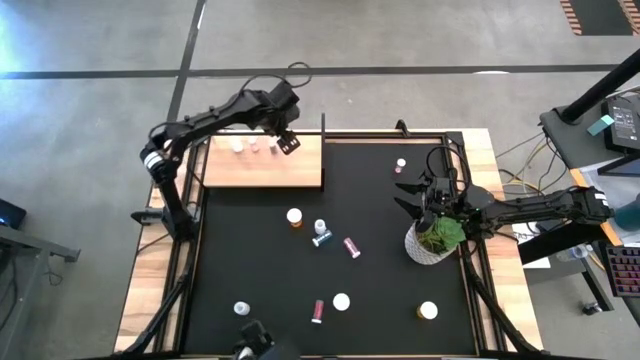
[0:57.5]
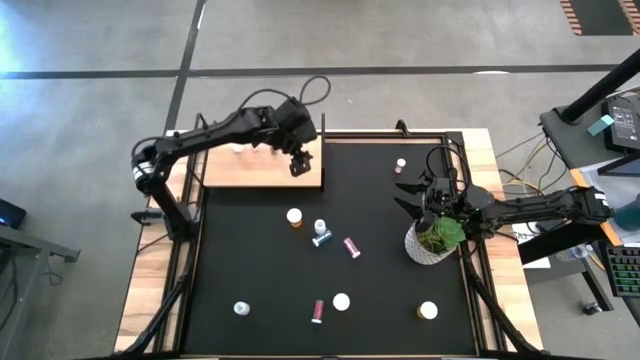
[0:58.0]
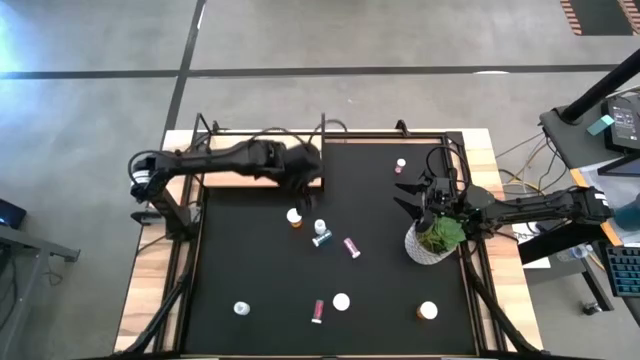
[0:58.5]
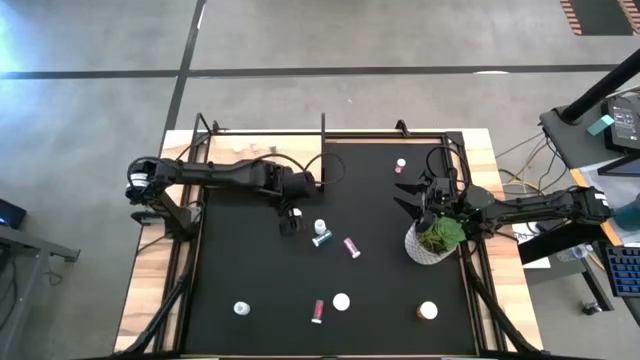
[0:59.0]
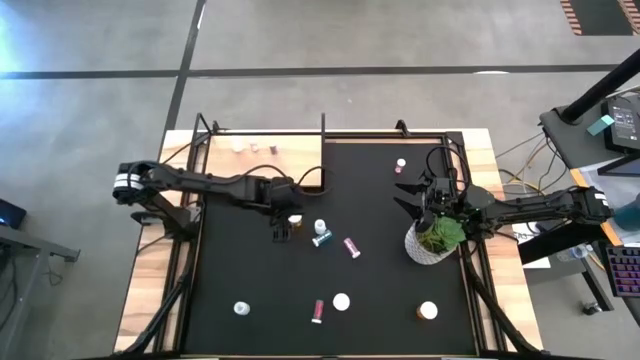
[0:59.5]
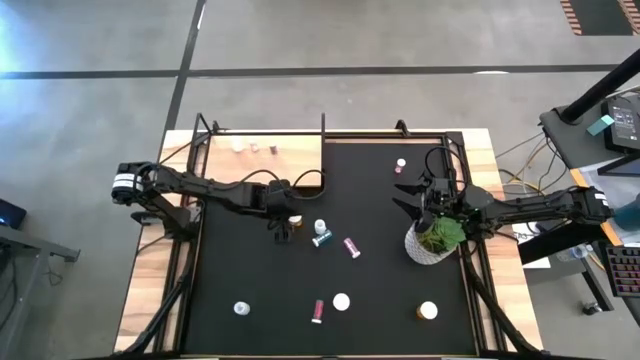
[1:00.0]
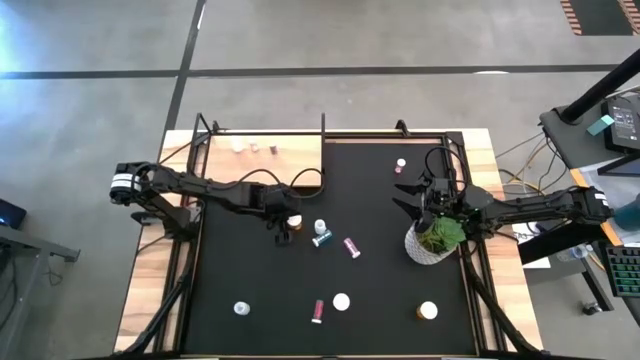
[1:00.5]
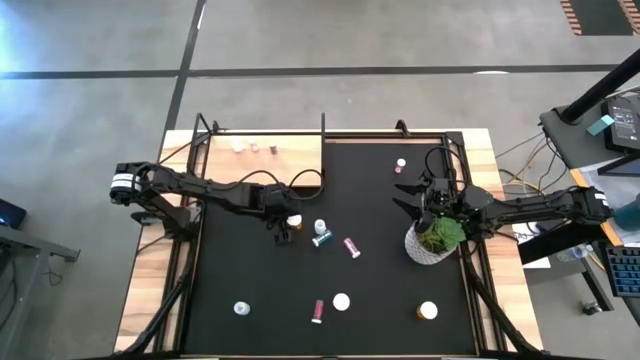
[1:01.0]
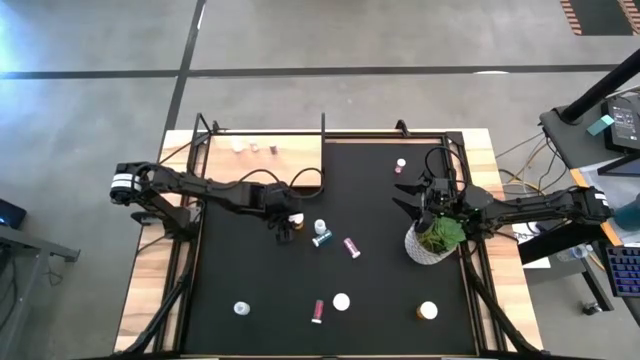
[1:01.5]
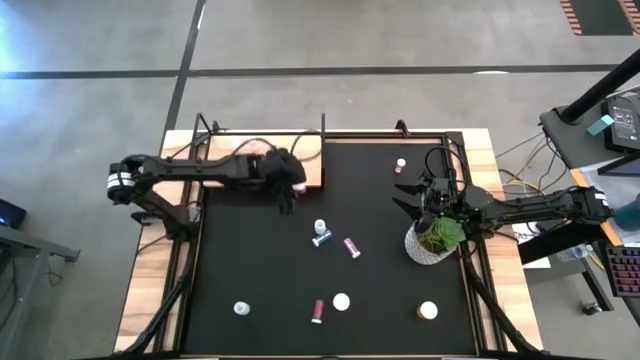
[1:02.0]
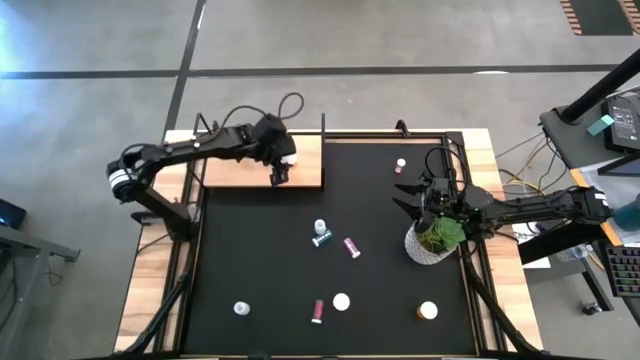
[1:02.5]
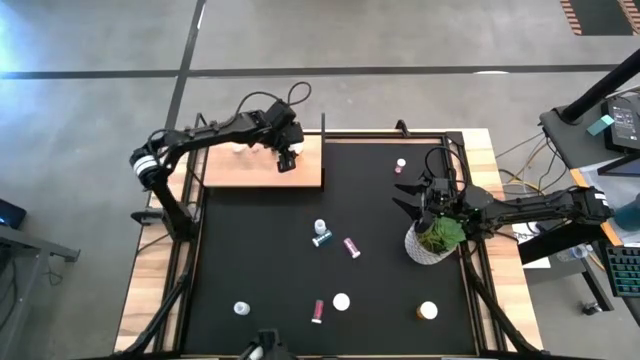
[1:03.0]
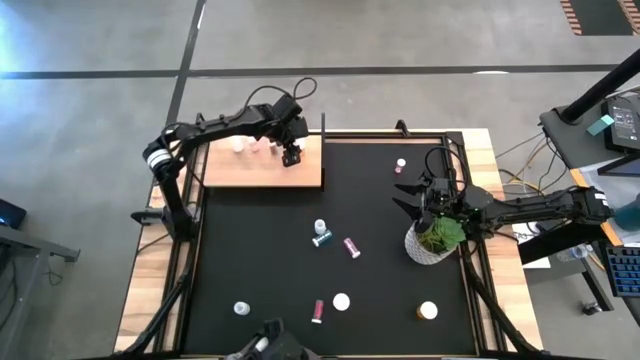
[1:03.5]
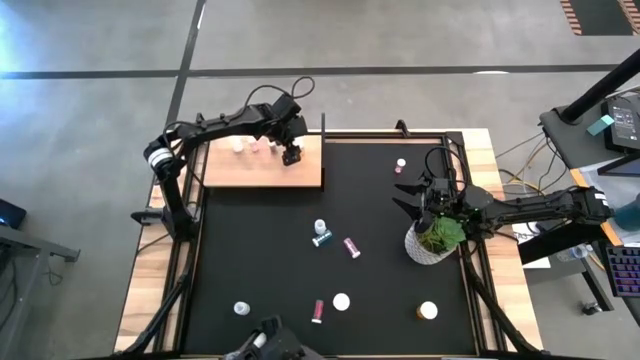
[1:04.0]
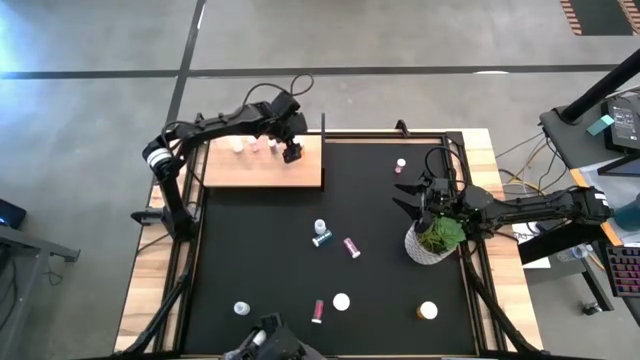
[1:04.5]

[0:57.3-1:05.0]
Task: Pick and place medicine bottles onto shelf by color
Put the top orange pill bottle into the shelf

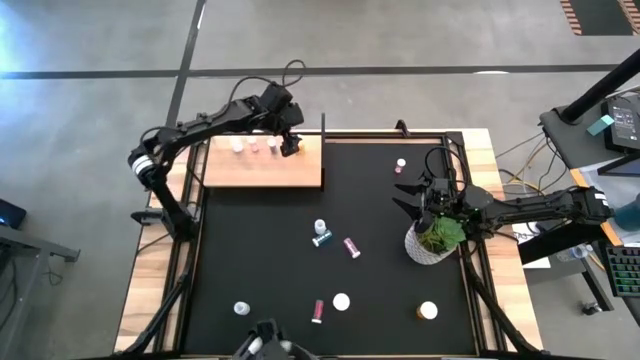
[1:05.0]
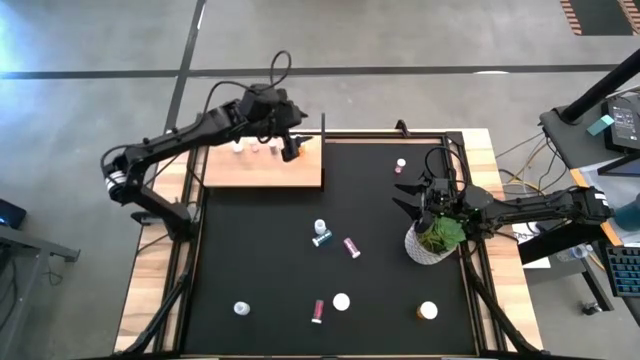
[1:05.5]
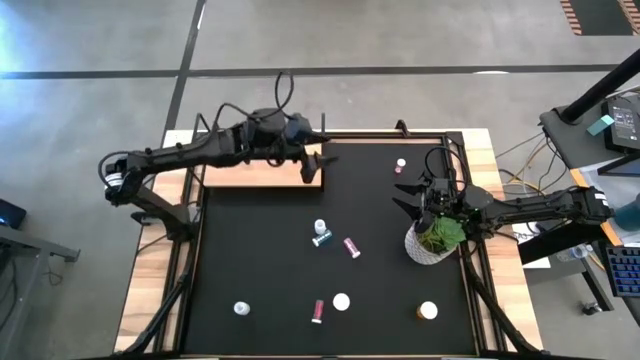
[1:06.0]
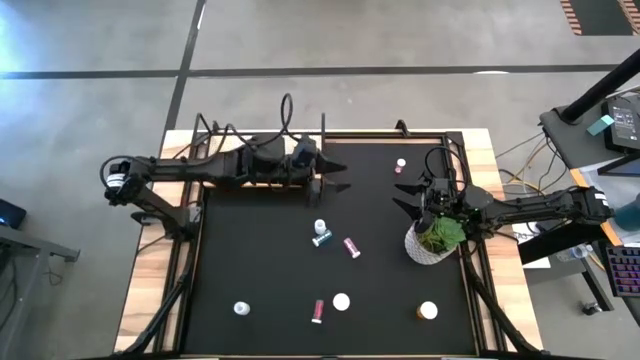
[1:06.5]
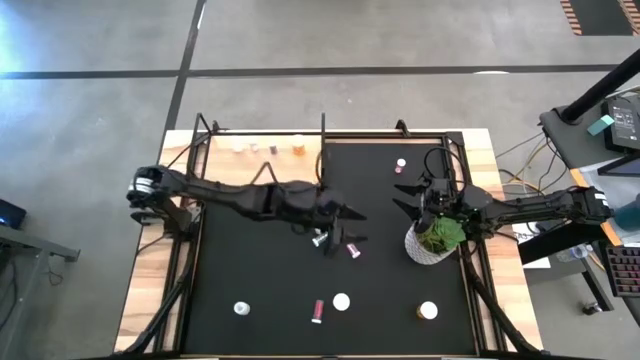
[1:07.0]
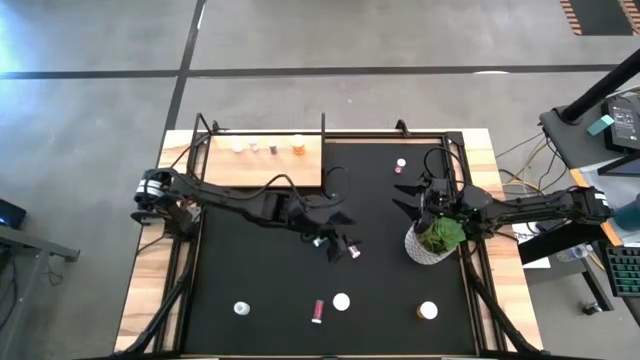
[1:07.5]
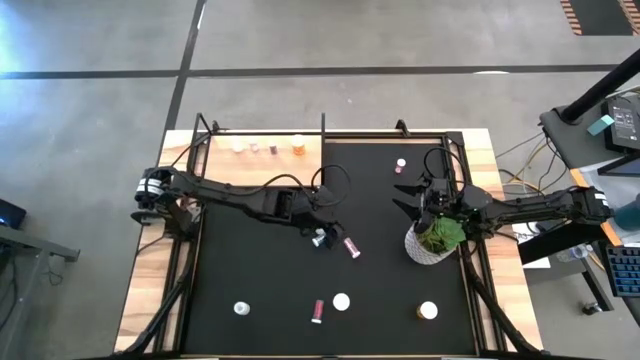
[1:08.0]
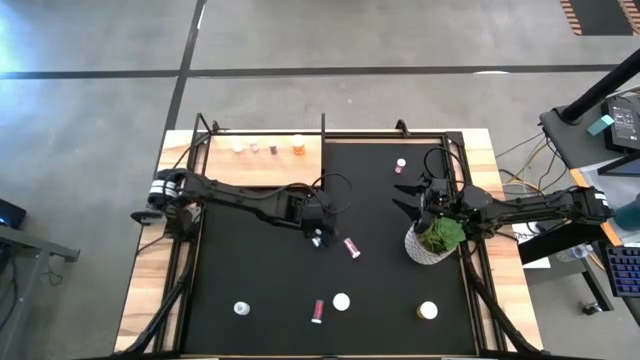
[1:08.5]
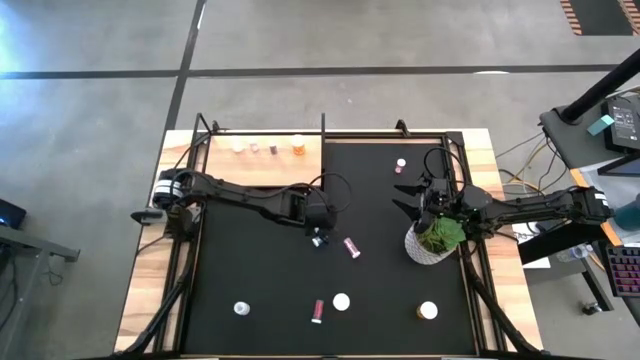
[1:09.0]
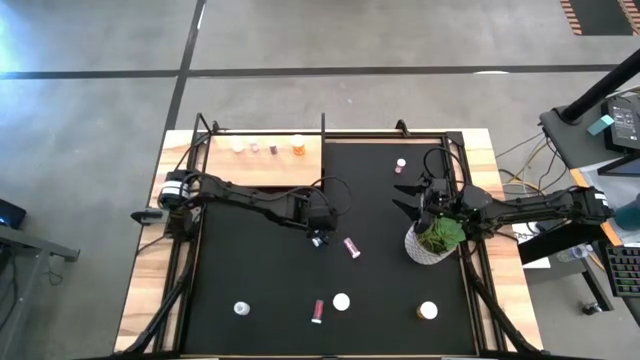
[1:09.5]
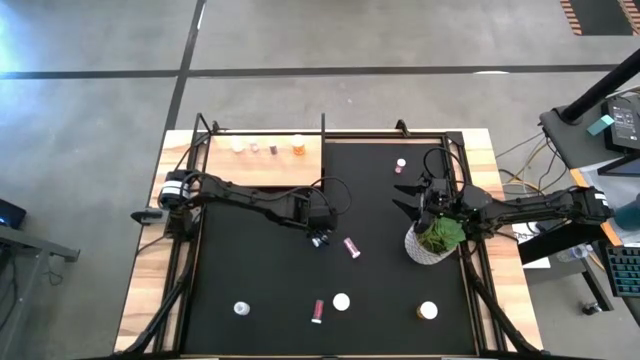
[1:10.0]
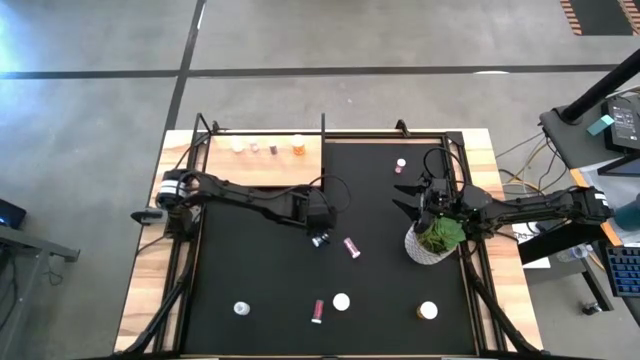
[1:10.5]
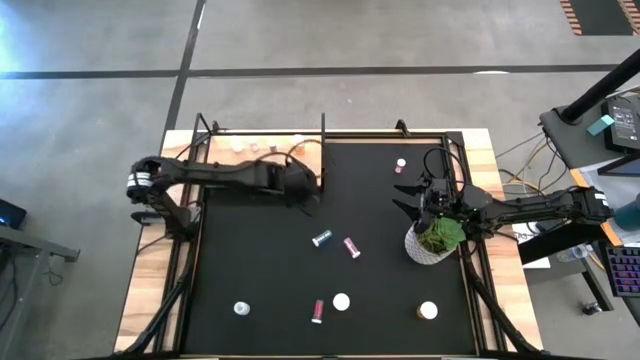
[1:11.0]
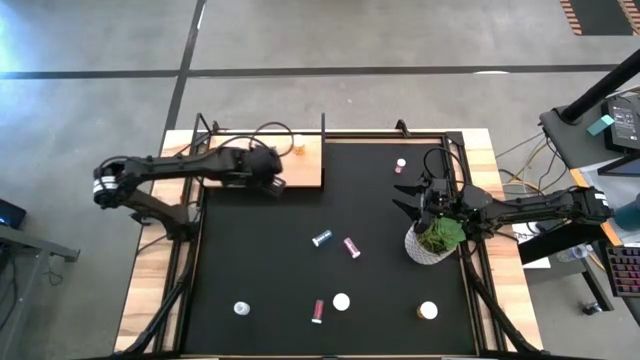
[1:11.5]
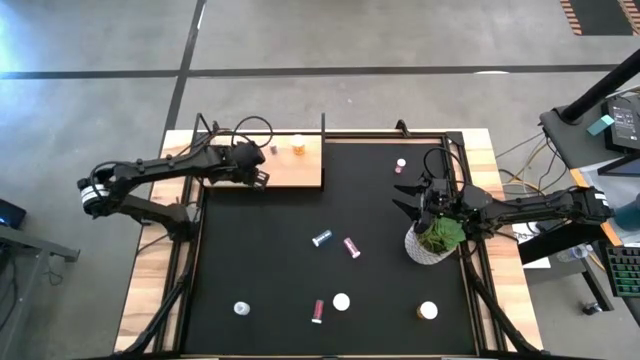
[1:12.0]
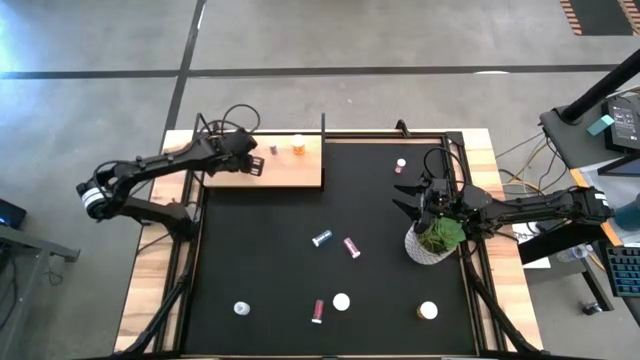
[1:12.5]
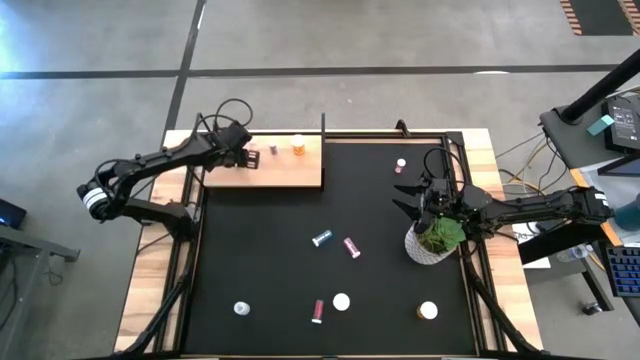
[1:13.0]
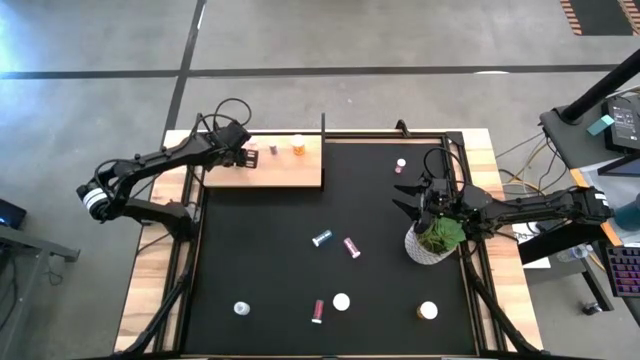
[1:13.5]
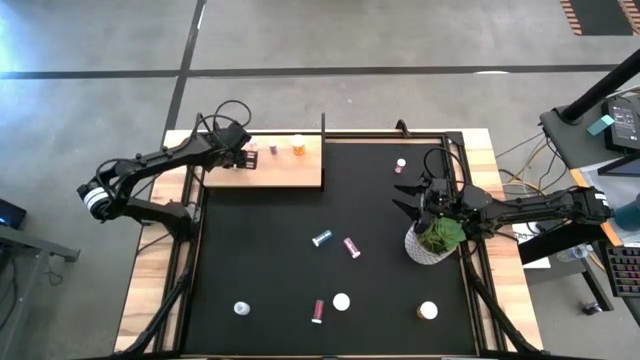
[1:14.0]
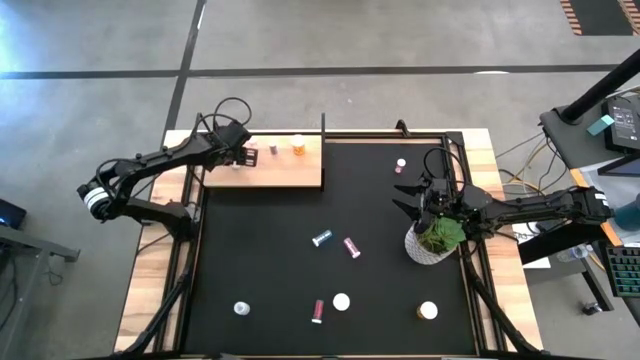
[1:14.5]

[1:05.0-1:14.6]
Put the top white pill bottle into the shelf

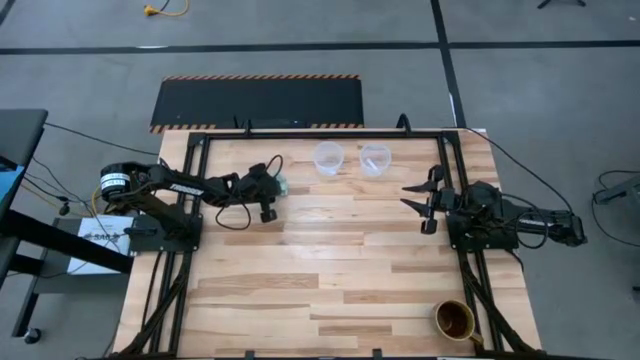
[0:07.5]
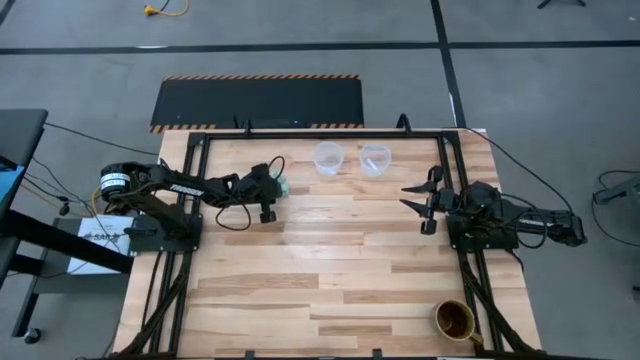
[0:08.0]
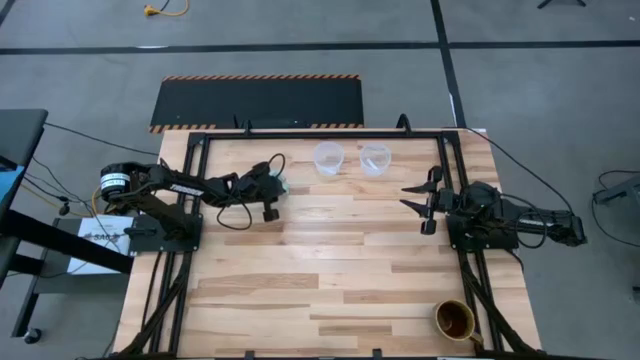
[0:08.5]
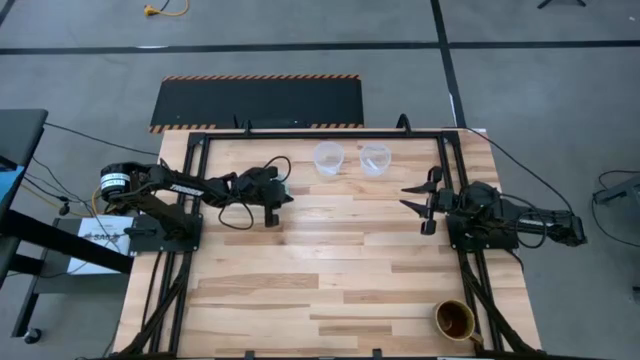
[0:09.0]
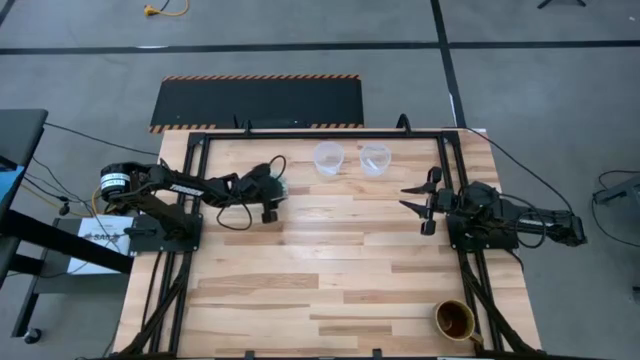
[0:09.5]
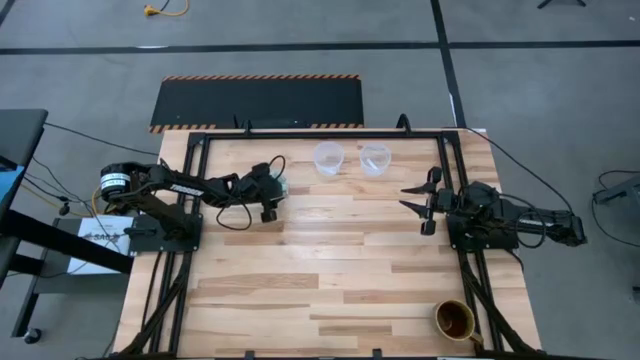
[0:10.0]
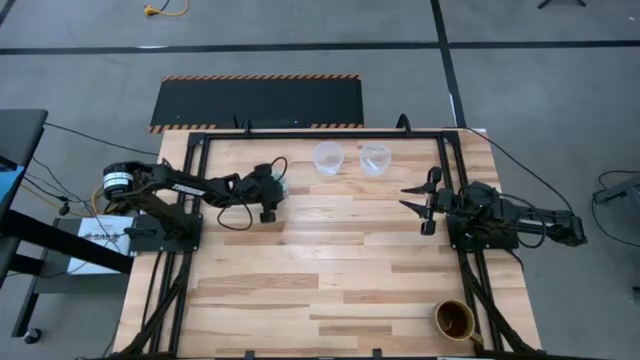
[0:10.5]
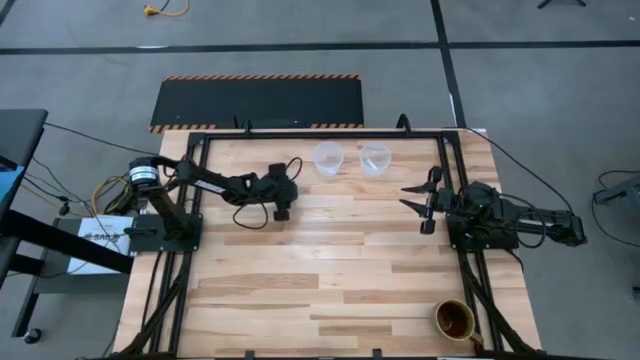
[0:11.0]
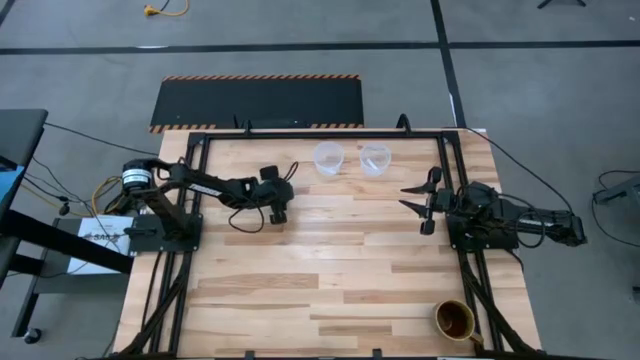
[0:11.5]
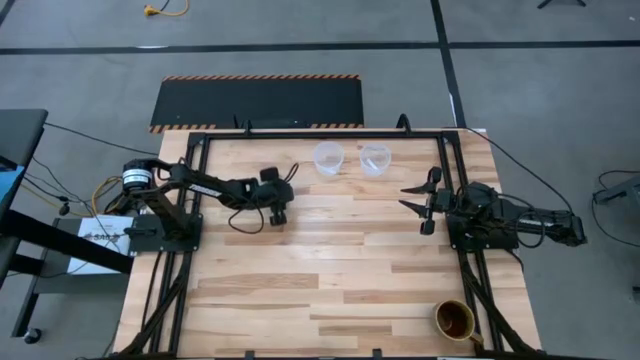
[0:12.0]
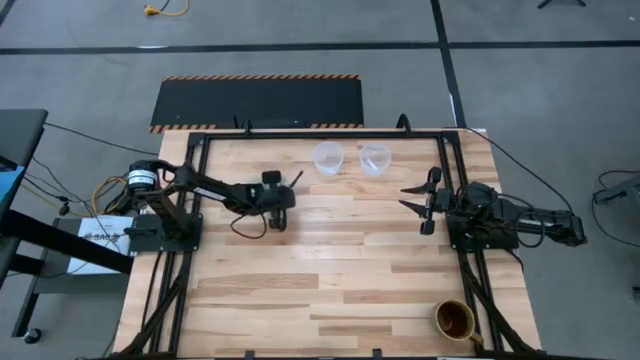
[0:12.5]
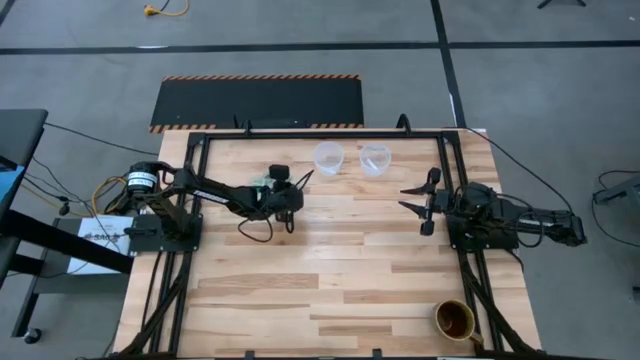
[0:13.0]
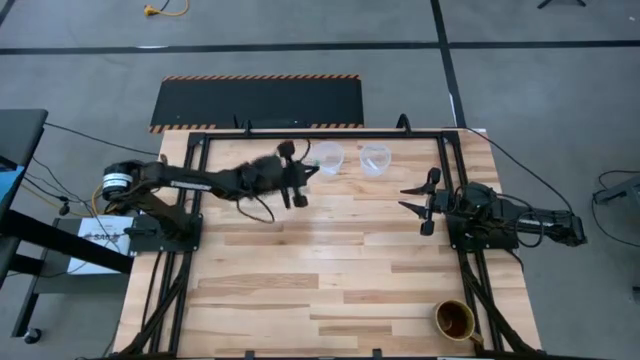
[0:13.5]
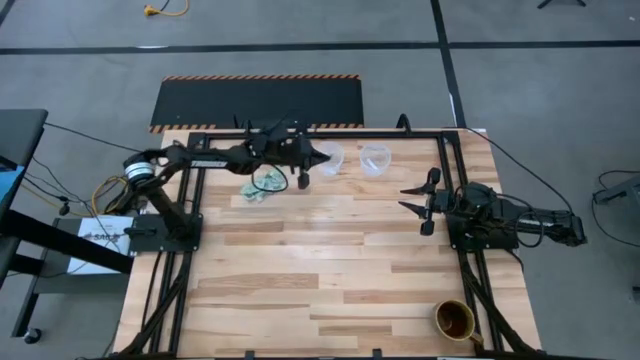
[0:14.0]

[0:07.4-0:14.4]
Task: Pick and place Stevia / Truvia into bins
Put the stevia packet into the left transparent container
